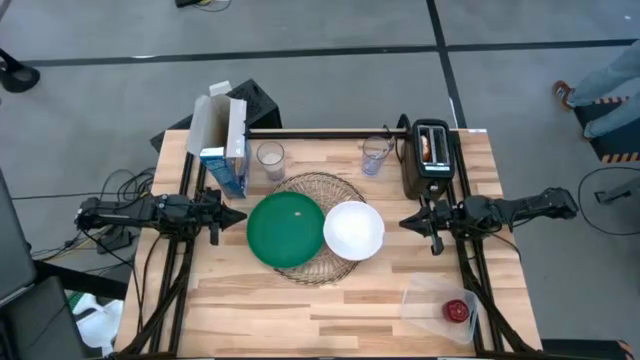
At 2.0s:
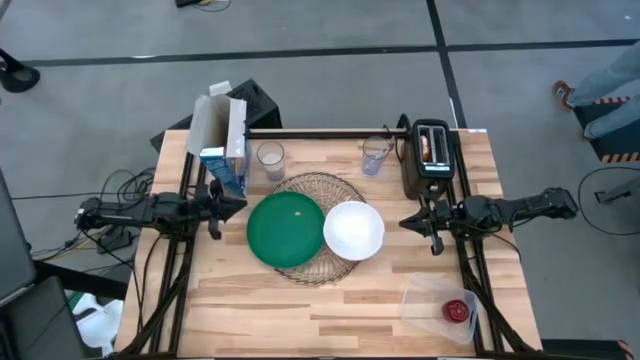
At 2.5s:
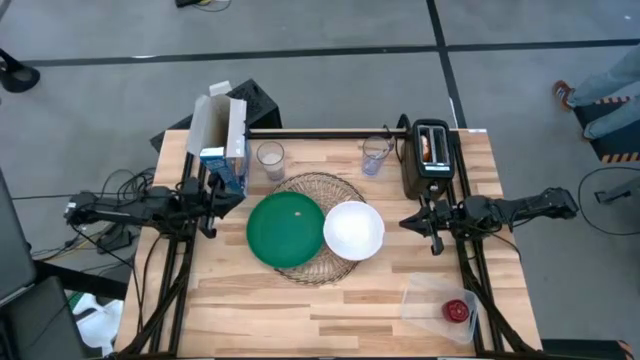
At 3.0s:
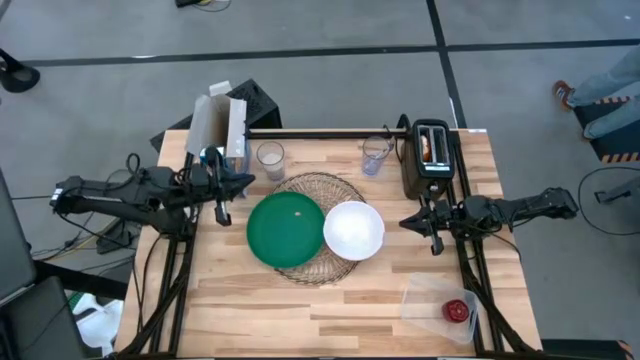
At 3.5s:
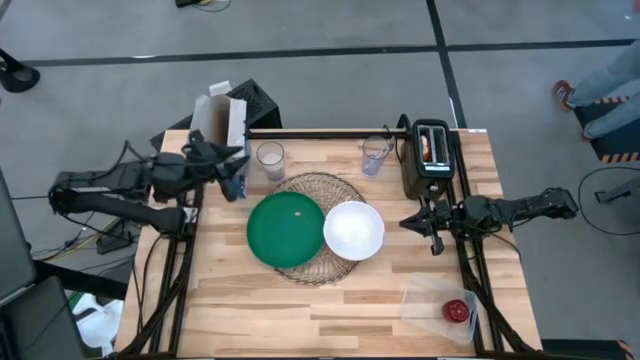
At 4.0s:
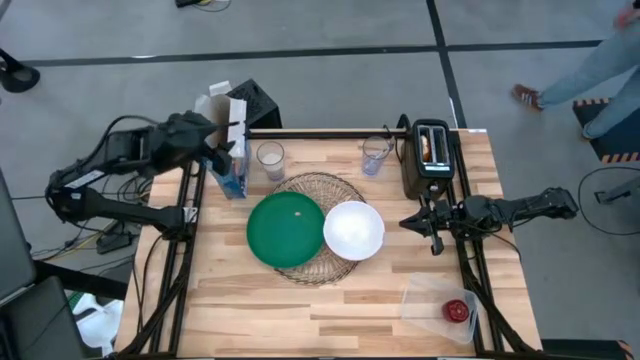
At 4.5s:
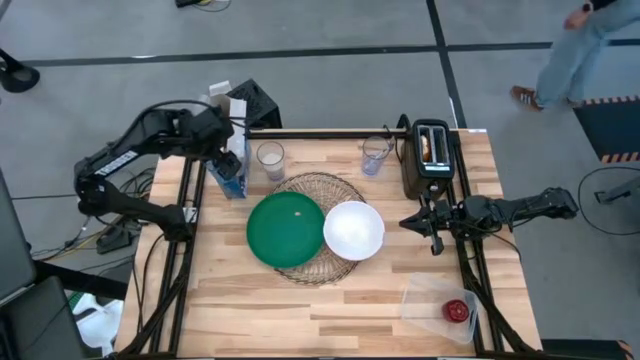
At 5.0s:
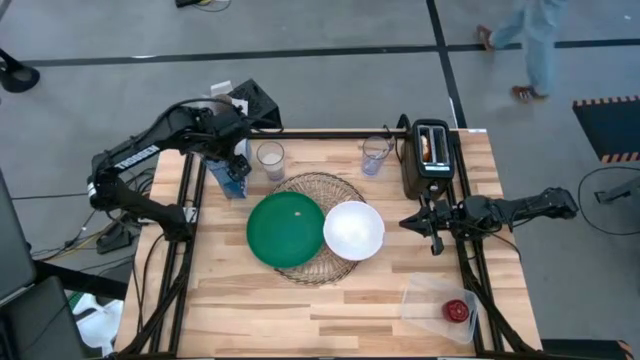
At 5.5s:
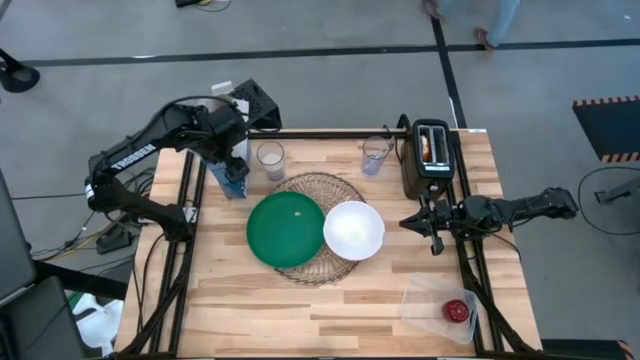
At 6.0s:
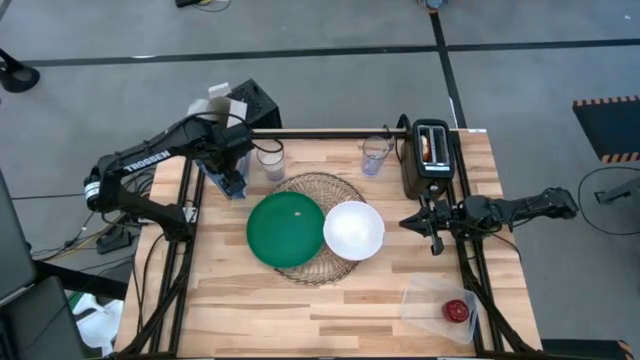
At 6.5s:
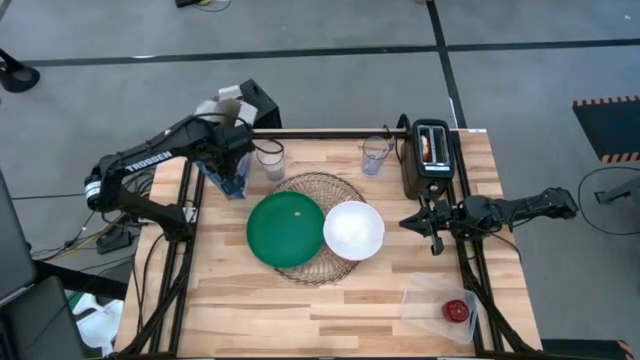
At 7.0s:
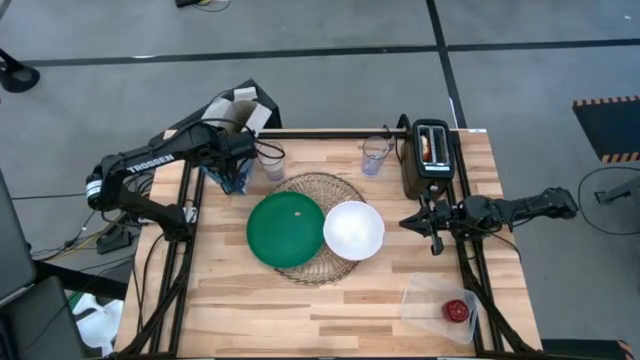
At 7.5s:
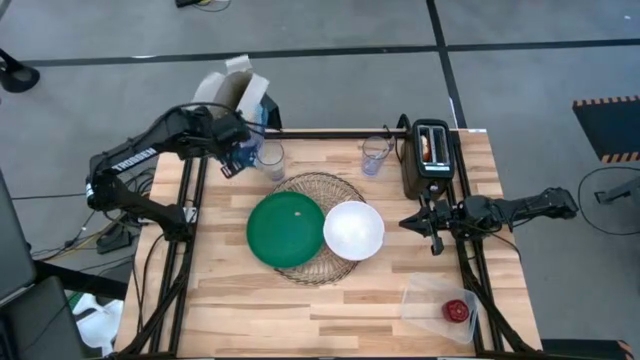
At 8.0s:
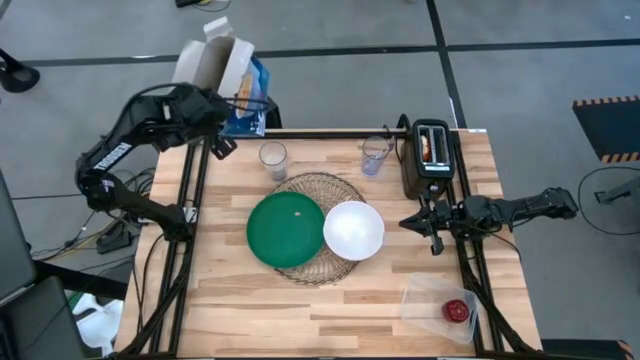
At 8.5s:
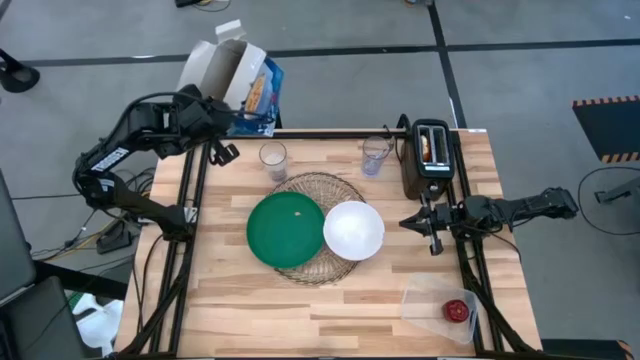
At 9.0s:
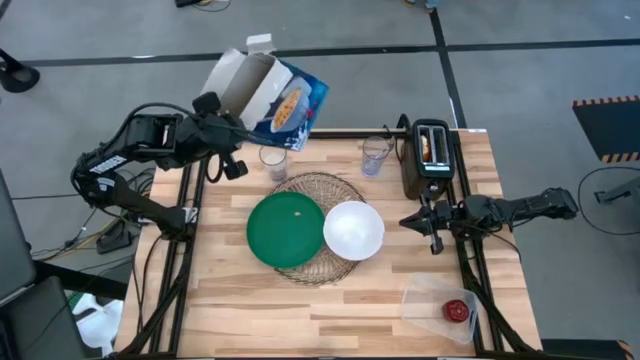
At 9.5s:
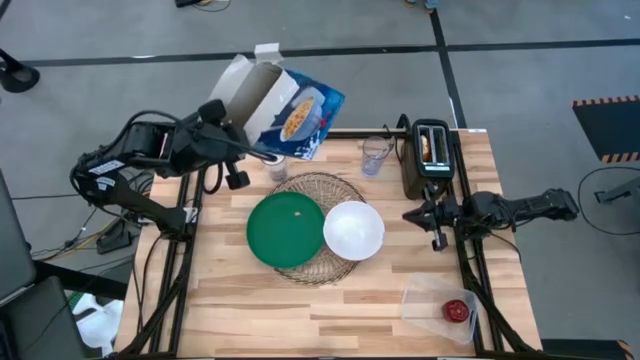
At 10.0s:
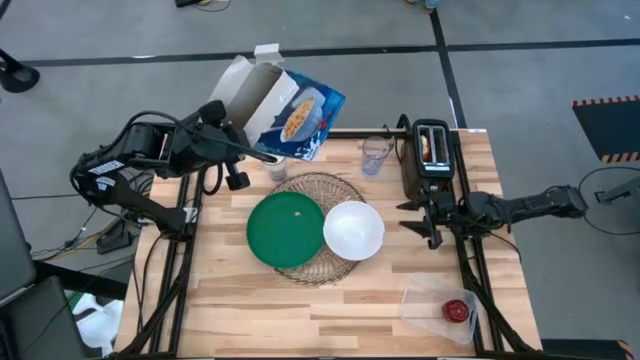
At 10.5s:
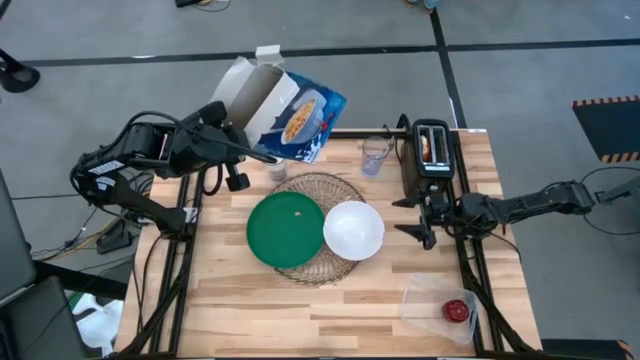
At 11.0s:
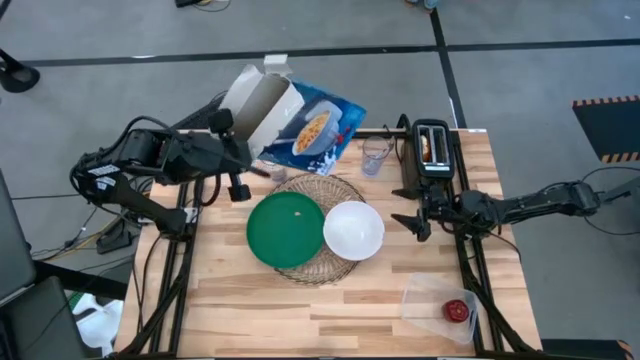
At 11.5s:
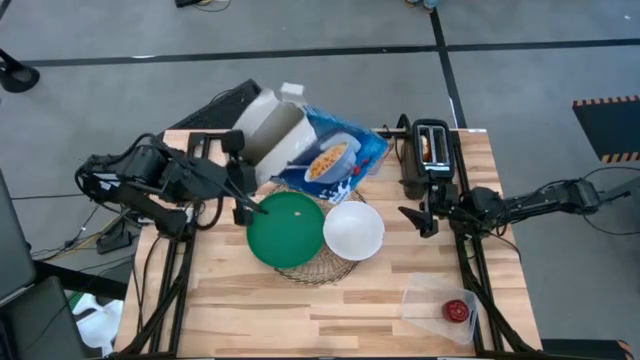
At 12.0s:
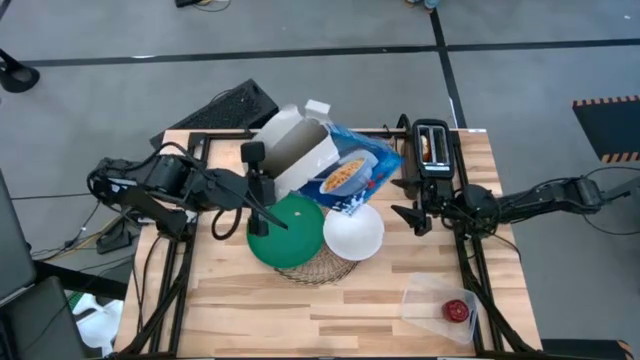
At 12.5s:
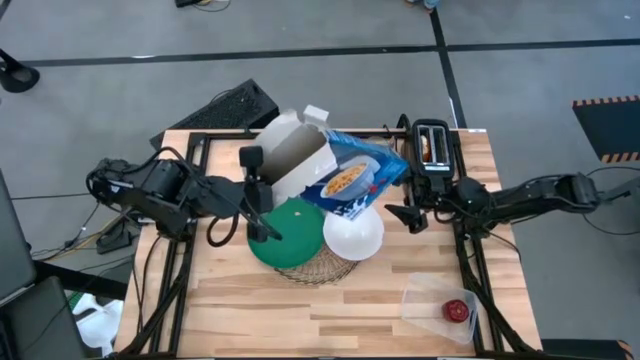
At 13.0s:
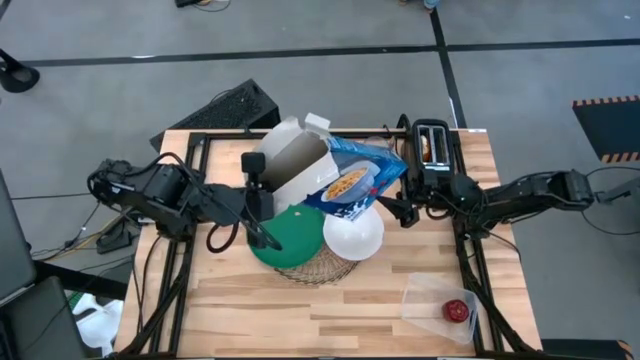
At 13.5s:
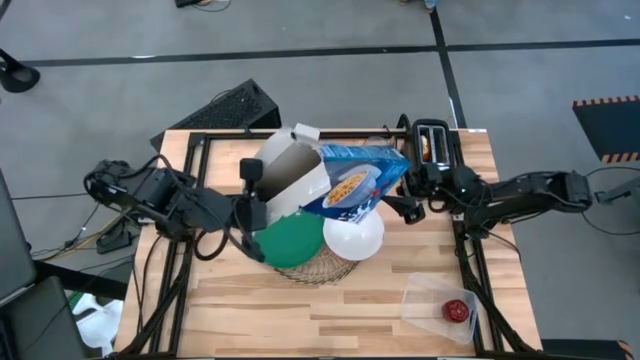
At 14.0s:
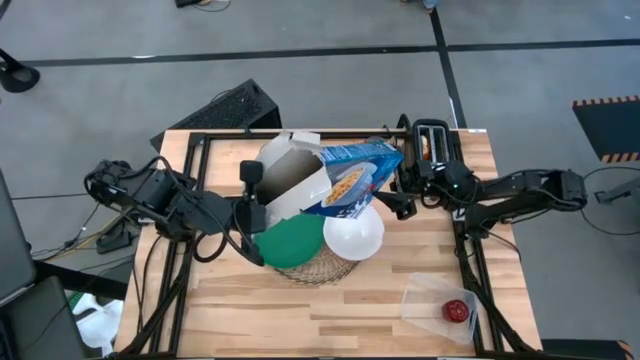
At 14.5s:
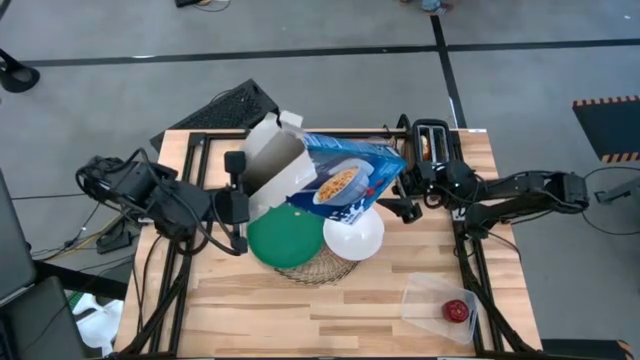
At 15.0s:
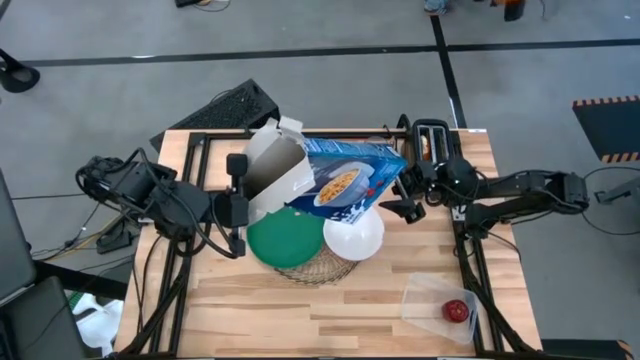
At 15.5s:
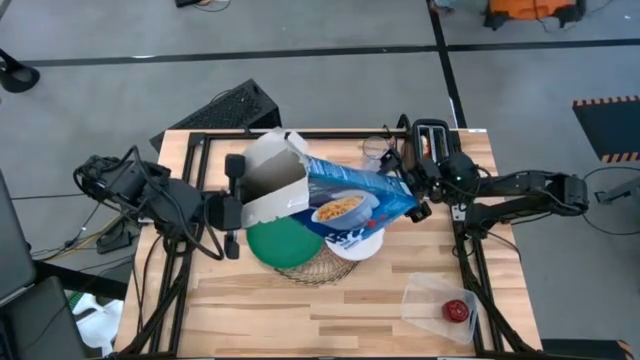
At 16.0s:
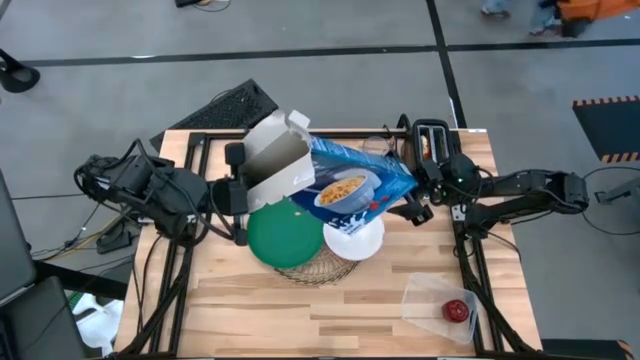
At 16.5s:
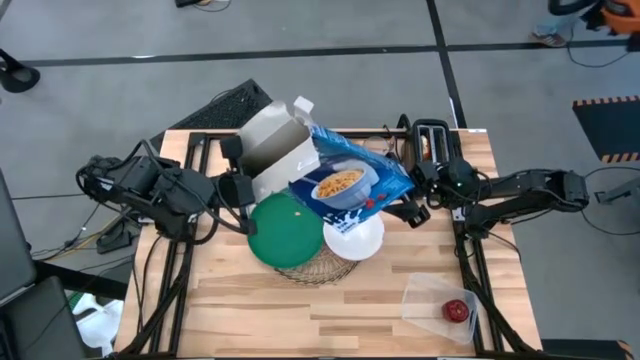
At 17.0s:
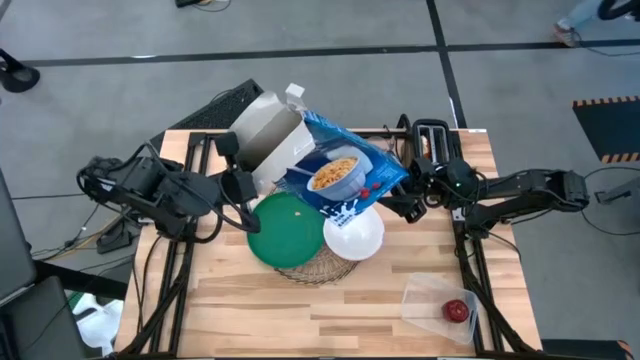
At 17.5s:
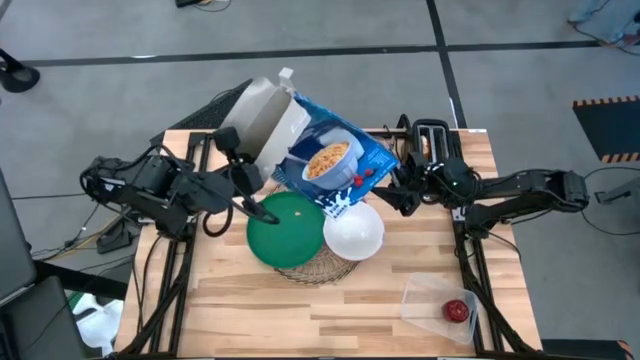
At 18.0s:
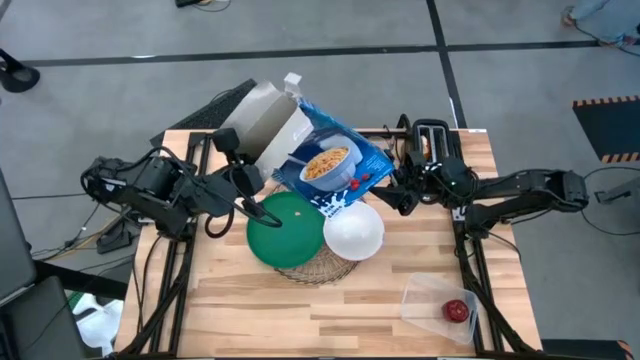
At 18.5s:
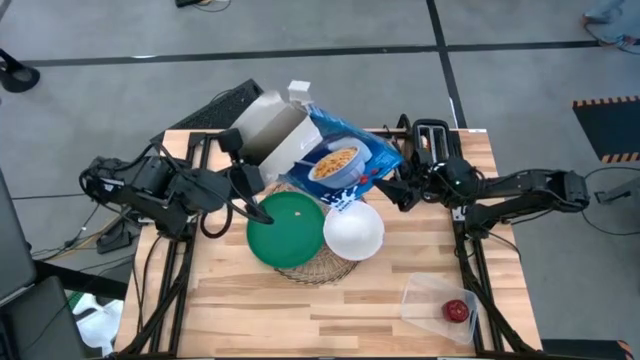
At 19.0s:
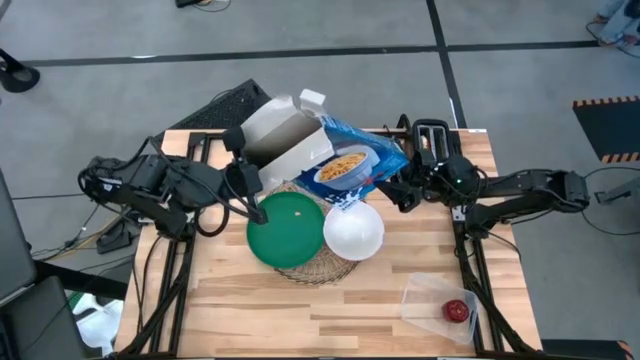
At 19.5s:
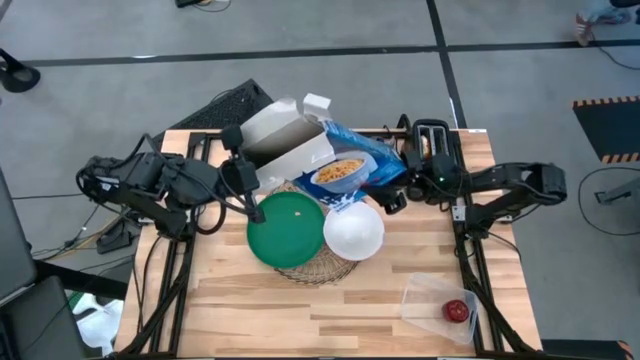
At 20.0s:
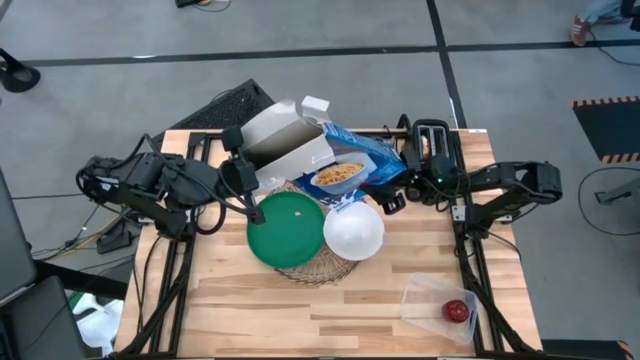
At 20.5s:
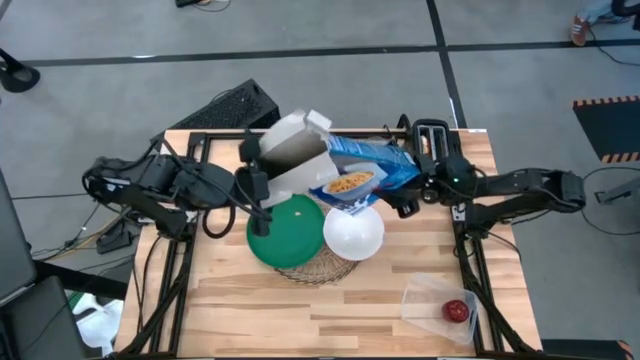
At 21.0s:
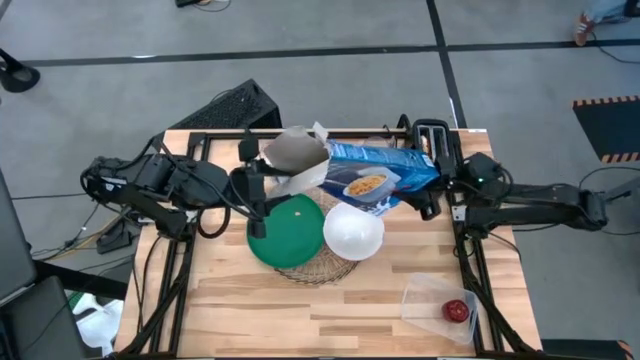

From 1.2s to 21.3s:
Task: Arrange a breakfast setting
Pour the cereal into the white bowl
